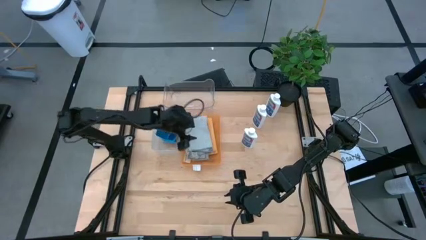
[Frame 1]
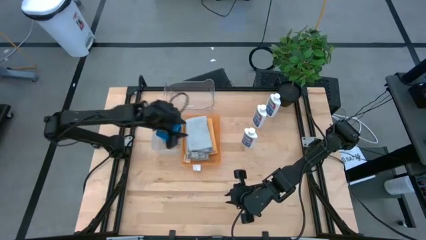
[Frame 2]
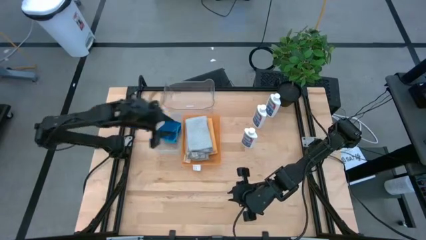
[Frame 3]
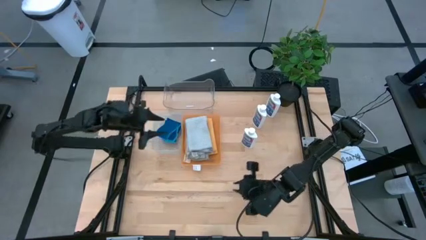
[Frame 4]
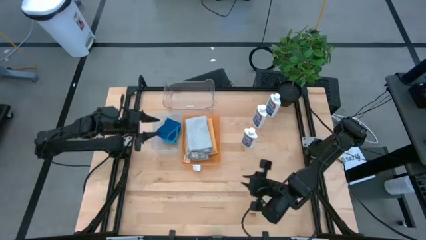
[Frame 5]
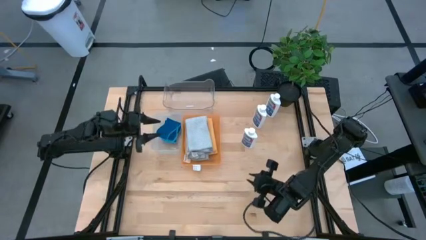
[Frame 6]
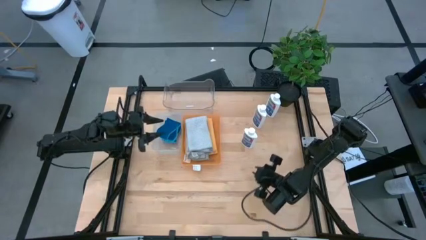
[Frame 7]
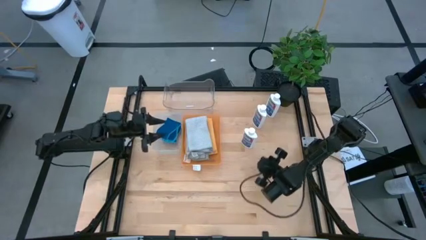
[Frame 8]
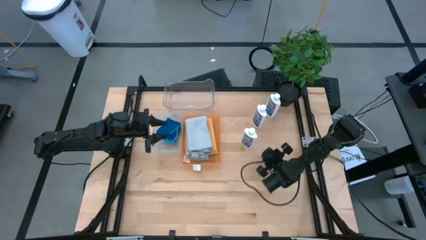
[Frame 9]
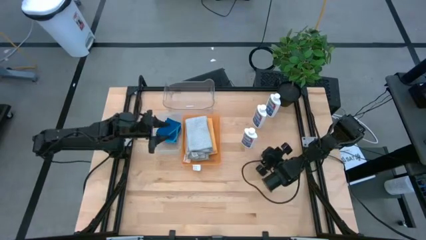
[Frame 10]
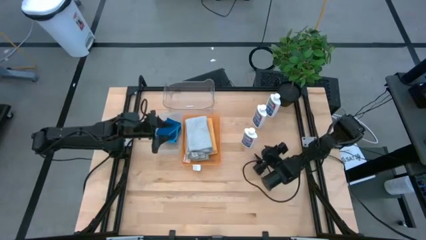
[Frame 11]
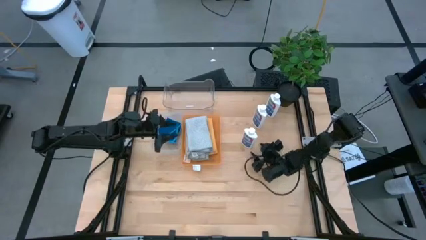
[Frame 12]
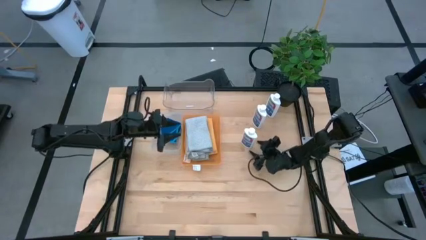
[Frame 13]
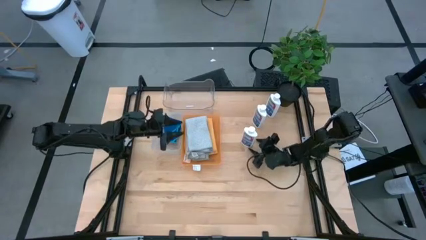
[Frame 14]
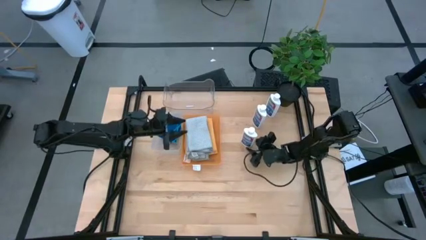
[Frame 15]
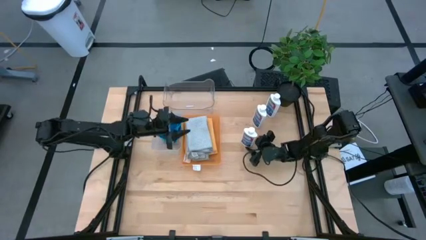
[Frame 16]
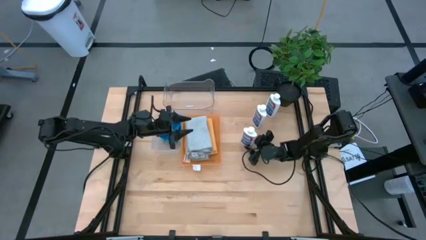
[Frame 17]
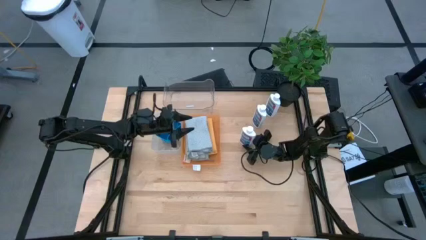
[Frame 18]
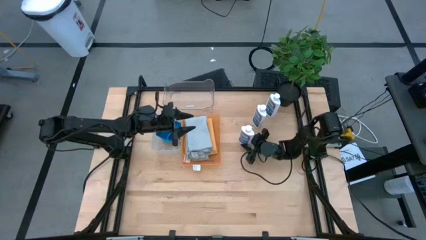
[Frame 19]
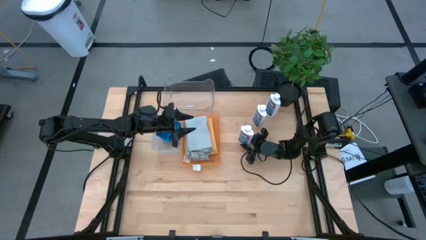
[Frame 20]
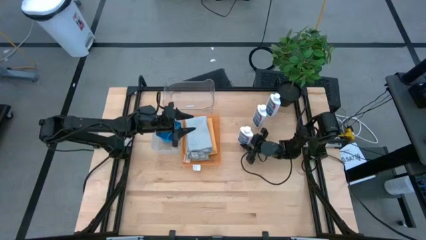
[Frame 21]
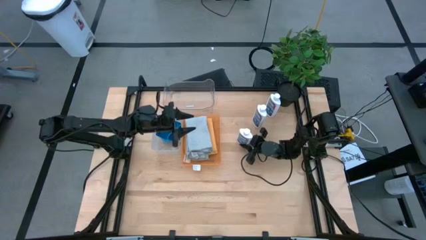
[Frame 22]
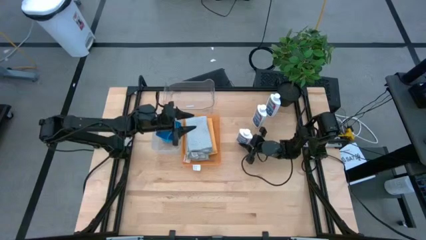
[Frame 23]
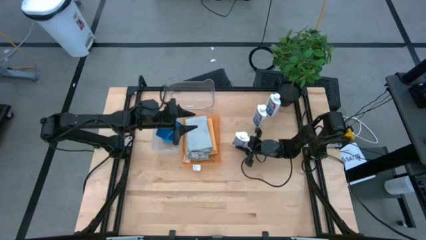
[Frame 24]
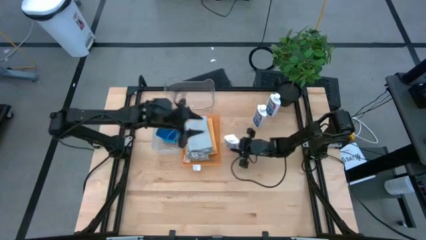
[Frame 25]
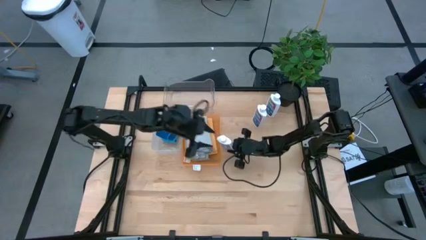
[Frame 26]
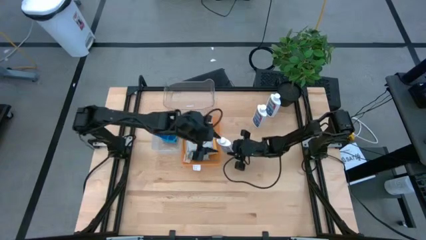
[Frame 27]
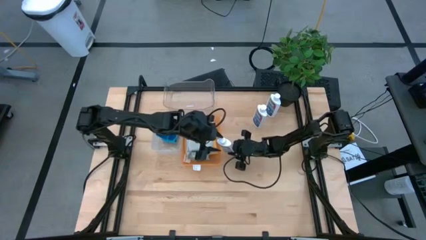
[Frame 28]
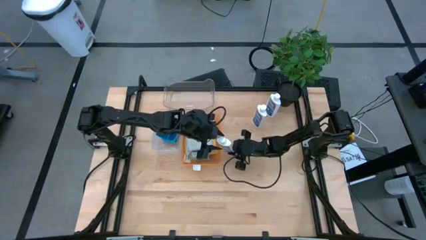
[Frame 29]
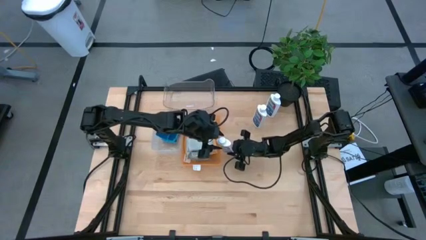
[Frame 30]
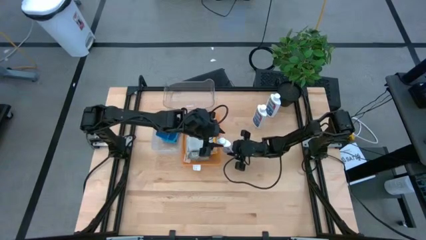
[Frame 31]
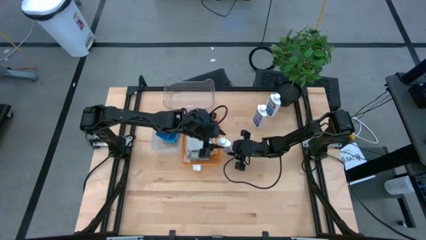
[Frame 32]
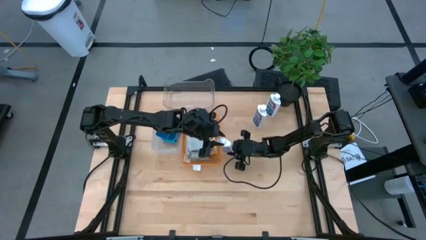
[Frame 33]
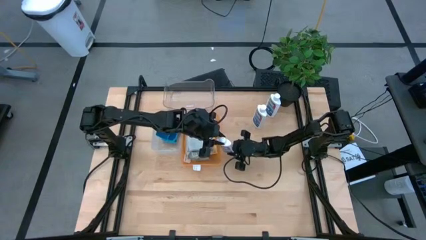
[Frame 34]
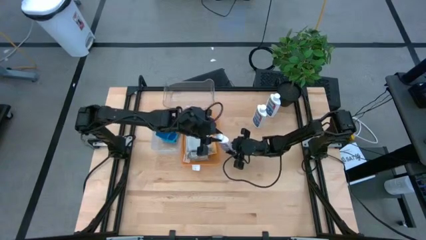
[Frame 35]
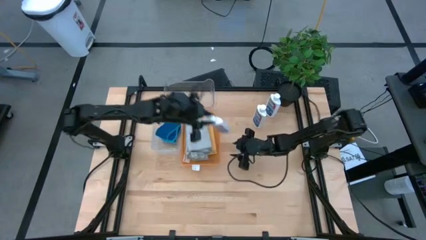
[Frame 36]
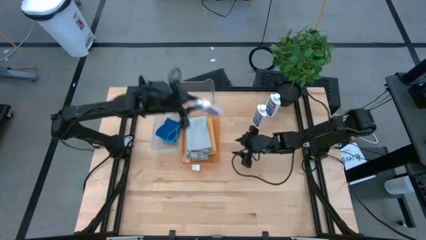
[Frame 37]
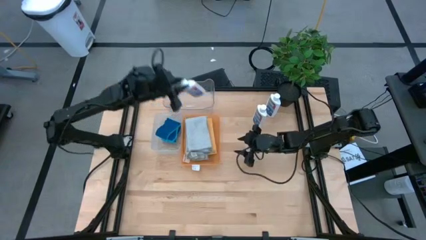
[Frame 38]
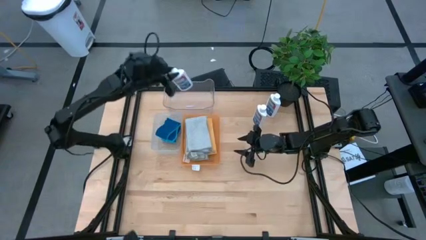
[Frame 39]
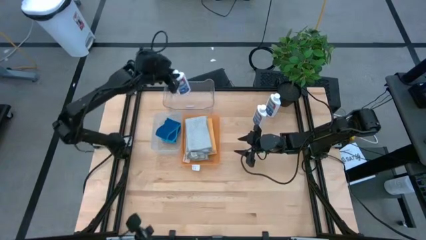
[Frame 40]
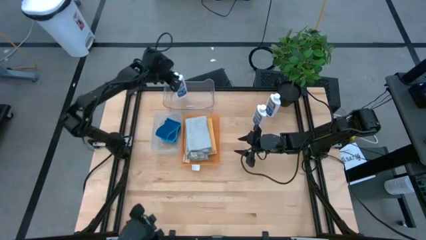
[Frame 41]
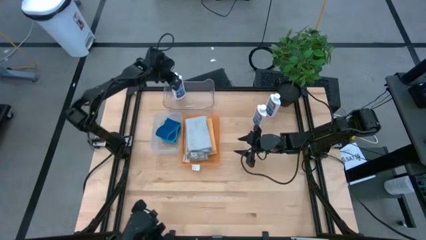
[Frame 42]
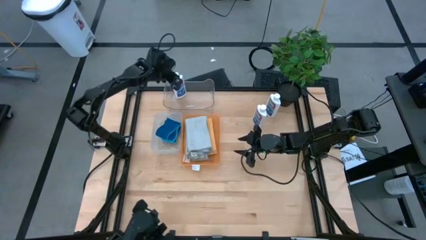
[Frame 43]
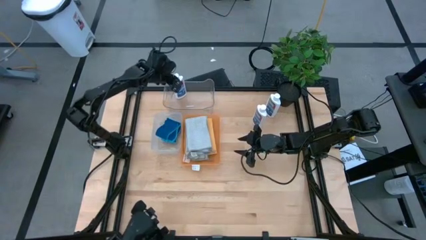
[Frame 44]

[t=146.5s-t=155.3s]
Task: Pick & Place Kitchen Items
Put the plastic restorer bottle into the transparent bin

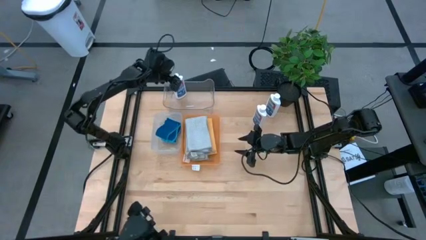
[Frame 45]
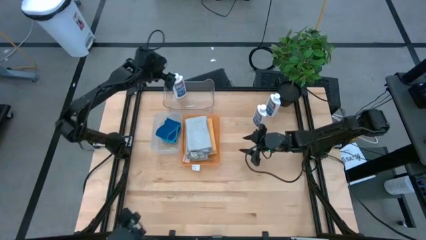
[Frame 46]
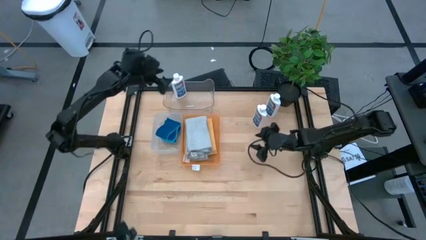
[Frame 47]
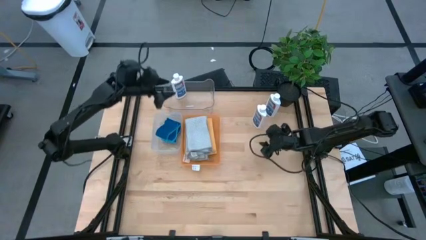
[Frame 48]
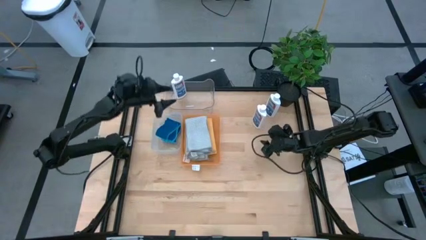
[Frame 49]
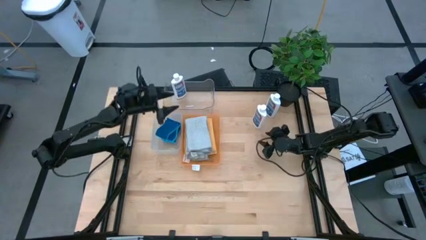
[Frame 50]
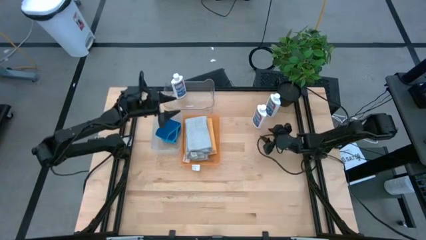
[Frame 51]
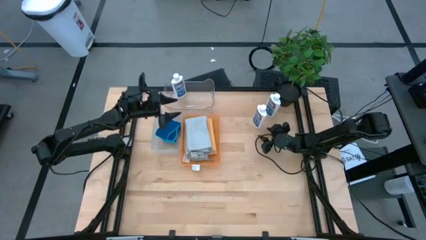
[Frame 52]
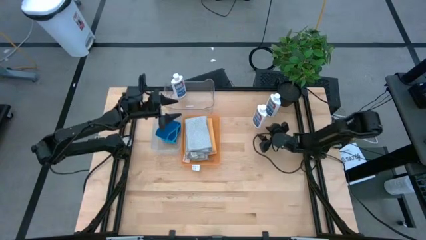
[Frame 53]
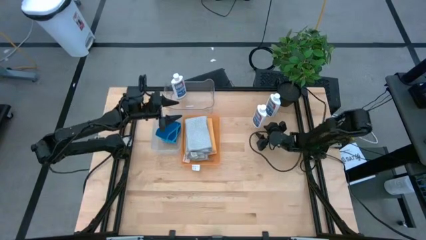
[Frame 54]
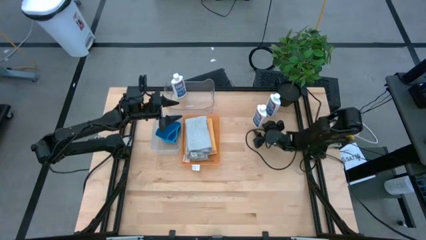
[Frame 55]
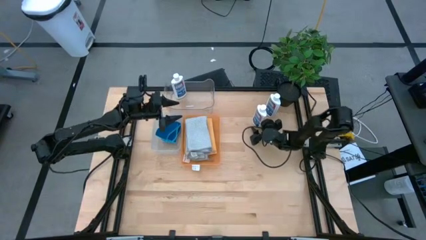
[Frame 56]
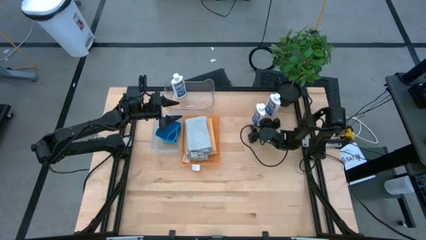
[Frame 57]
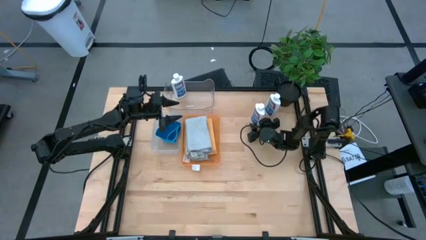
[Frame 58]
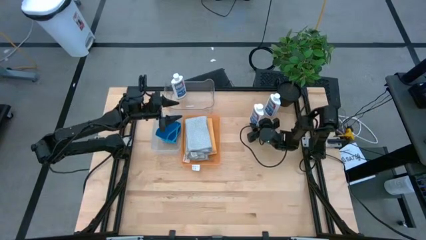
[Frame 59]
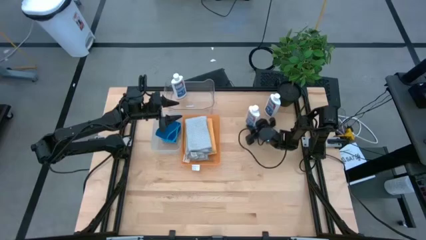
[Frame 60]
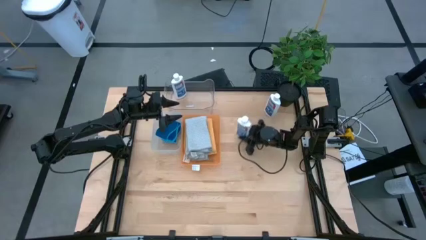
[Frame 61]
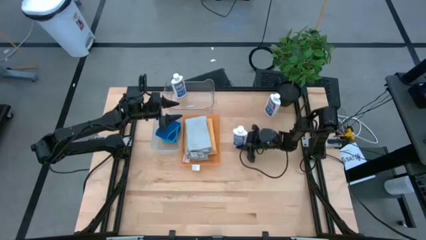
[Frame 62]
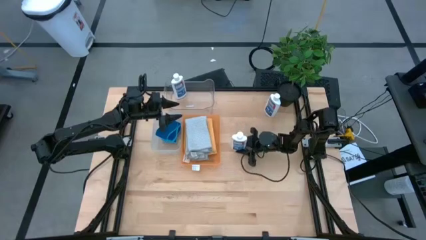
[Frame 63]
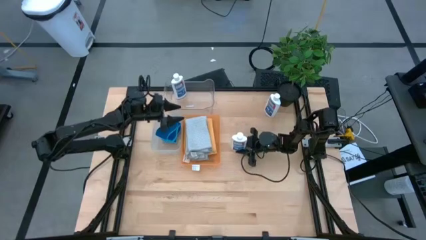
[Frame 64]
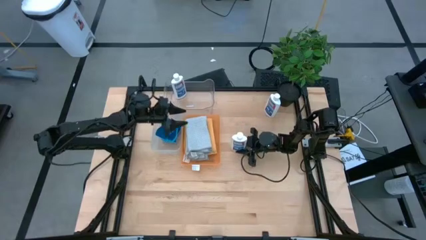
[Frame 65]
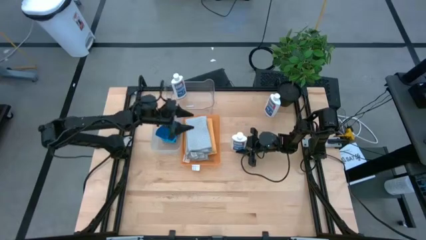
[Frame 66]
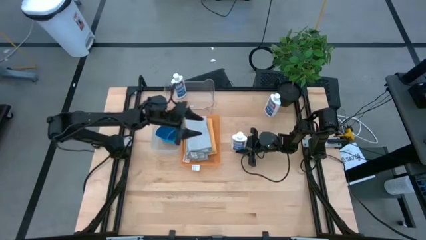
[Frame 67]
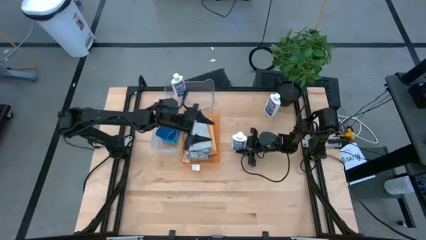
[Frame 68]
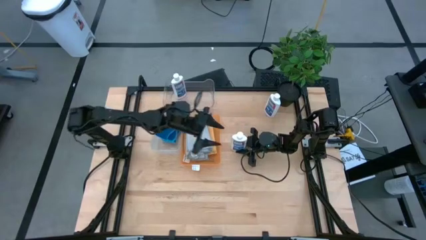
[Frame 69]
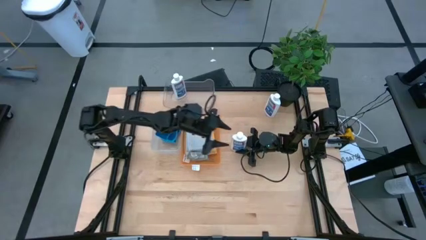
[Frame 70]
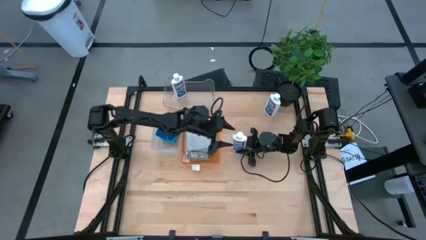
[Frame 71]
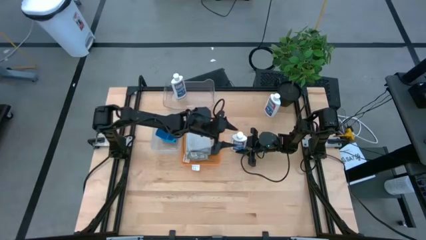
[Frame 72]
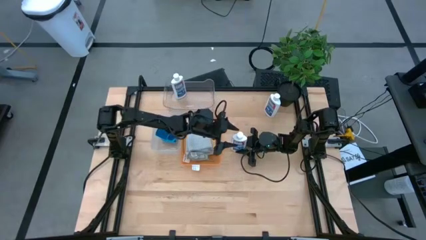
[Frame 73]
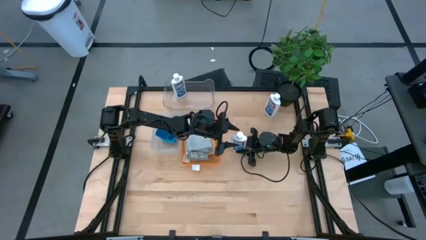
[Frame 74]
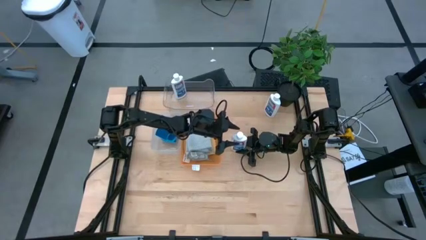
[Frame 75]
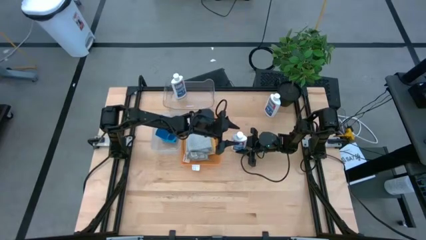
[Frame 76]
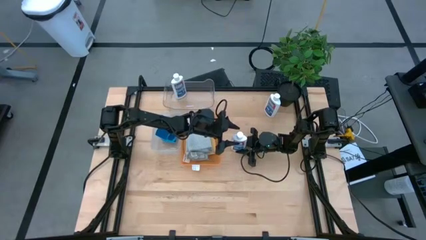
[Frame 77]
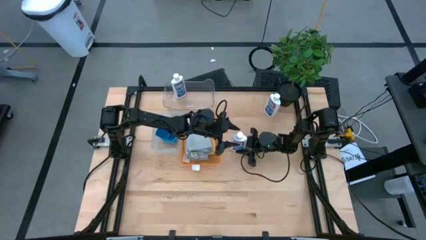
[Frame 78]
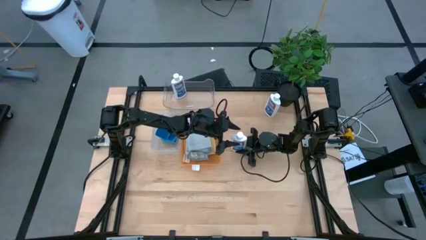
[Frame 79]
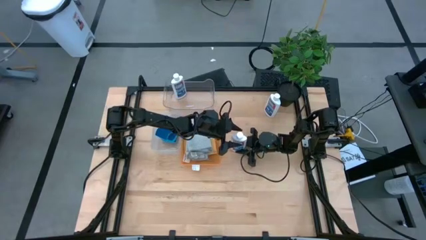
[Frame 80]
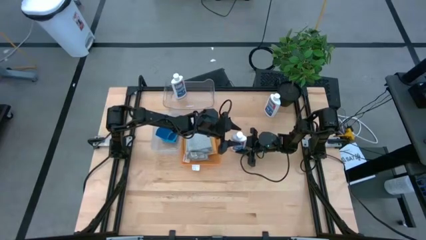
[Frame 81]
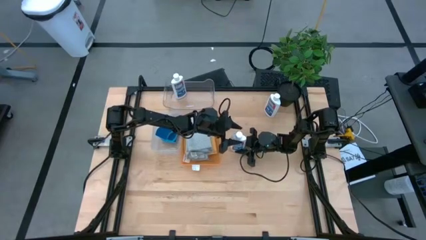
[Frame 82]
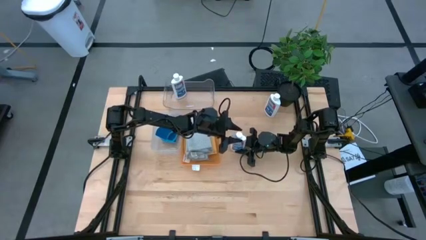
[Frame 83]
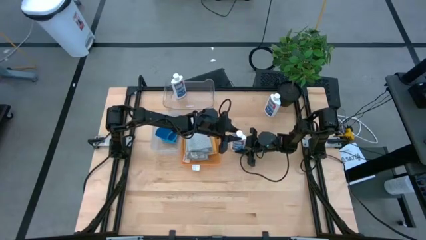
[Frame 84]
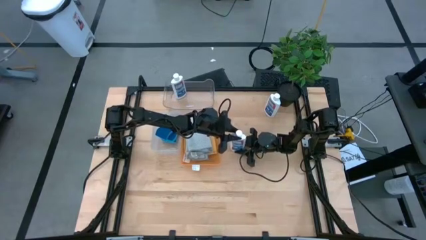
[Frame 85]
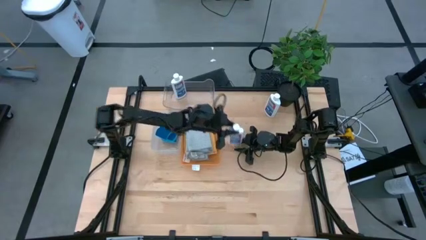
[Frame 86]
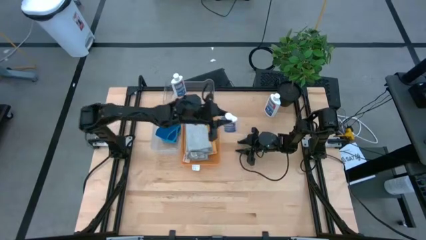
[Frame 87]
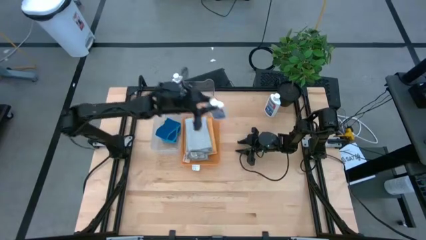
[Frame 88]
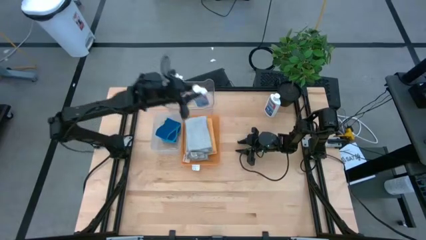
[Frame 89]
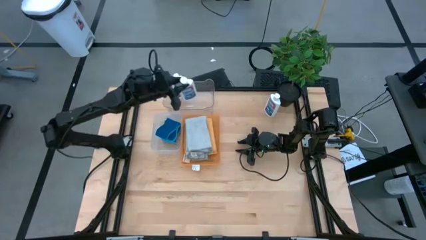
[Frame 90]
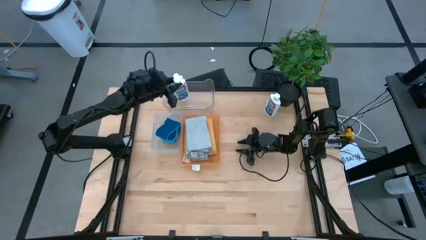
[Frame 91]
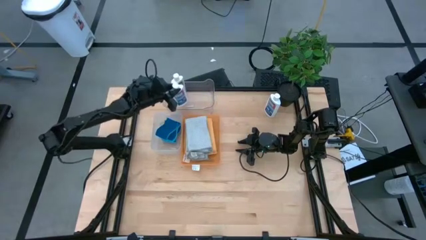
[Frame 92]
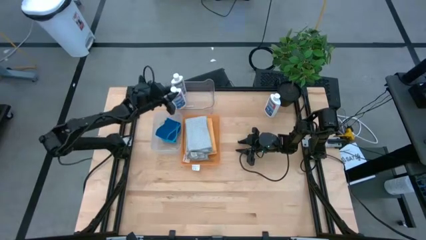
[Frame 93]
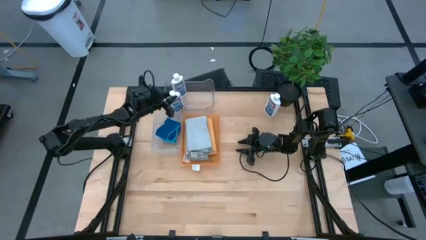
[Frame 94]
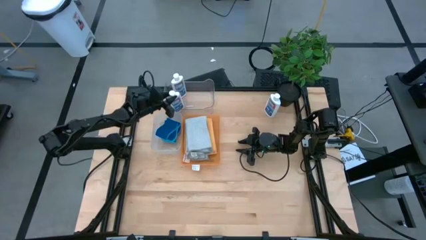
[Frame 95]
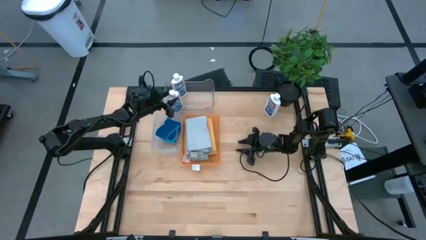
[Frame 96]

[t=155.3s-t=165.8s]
Put the plastic restorer bottle into the transparent bin
